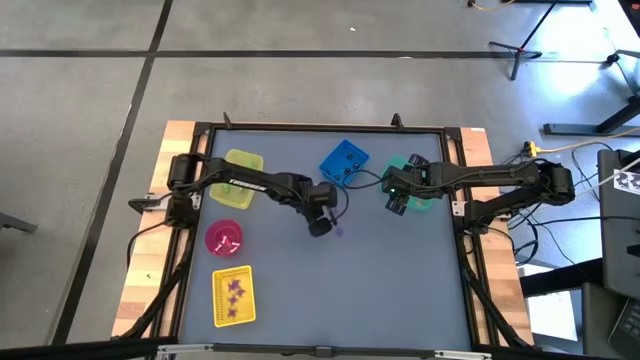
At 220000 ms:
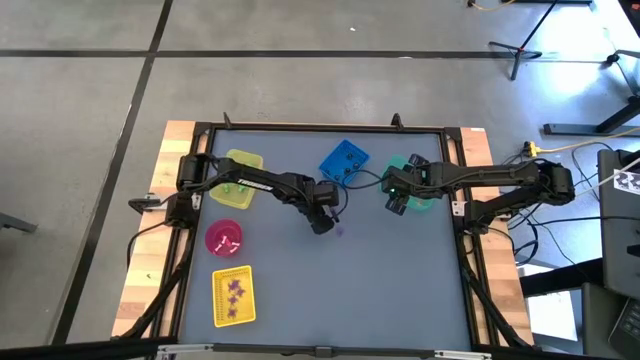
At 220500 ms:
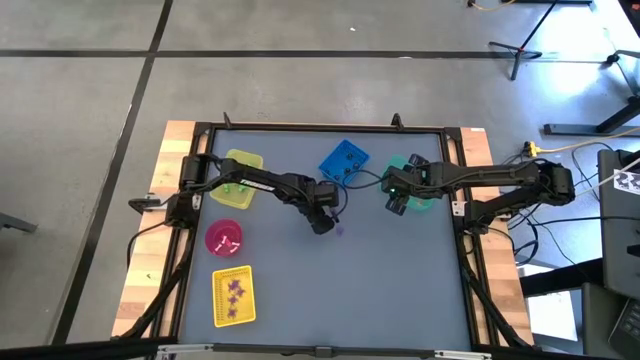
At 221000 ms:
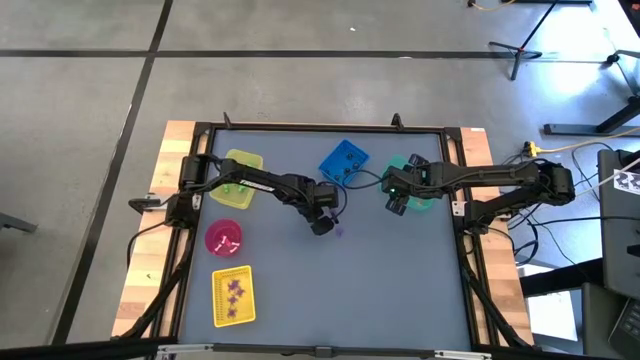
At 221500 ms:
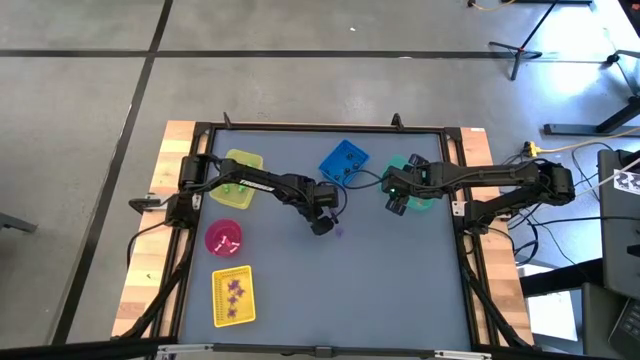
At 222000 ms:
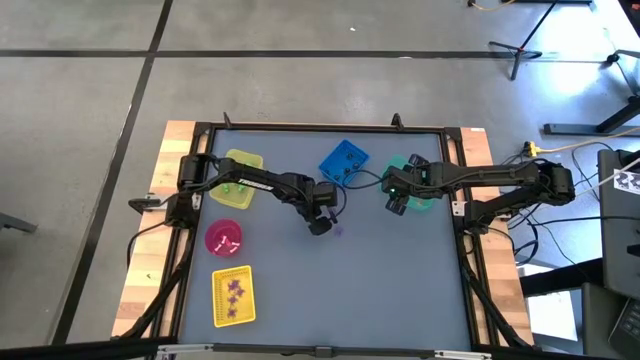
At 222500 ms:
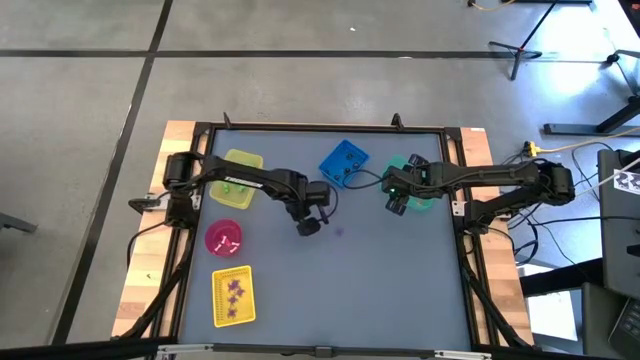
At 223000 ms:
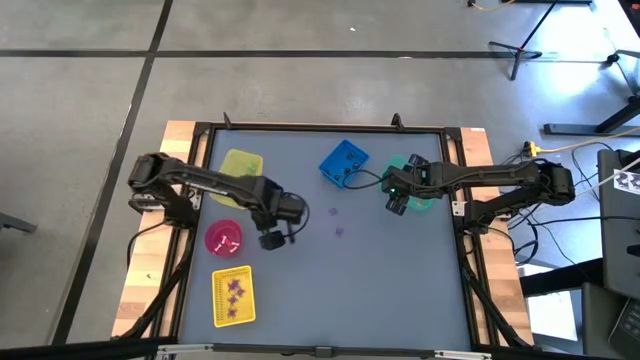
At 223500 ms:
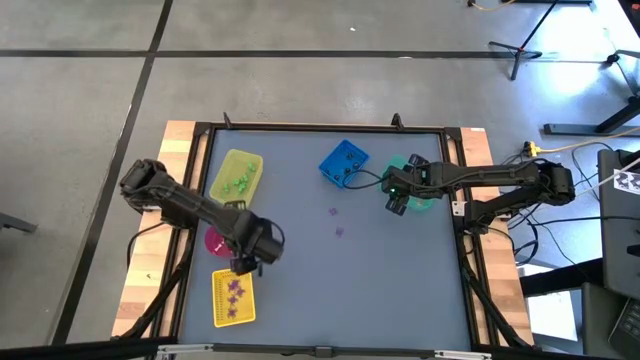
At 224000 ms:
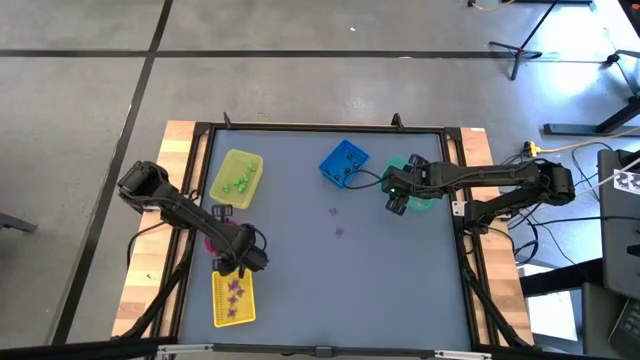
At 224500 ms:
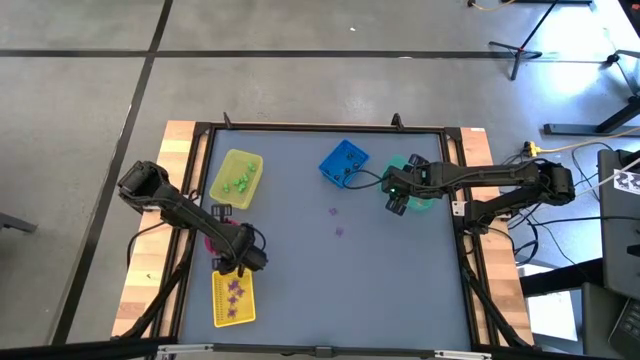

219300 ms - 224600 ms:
Task: Sort Halloween decoration
Put the white bone toy into the red bowl

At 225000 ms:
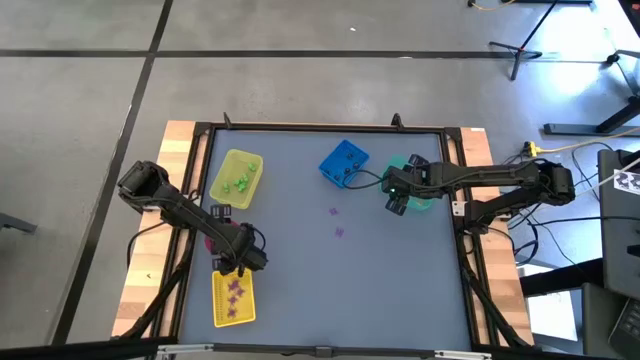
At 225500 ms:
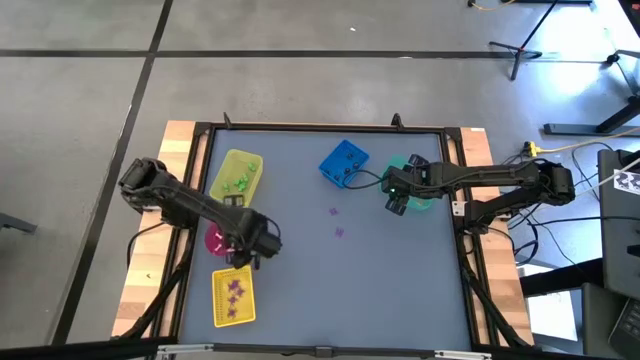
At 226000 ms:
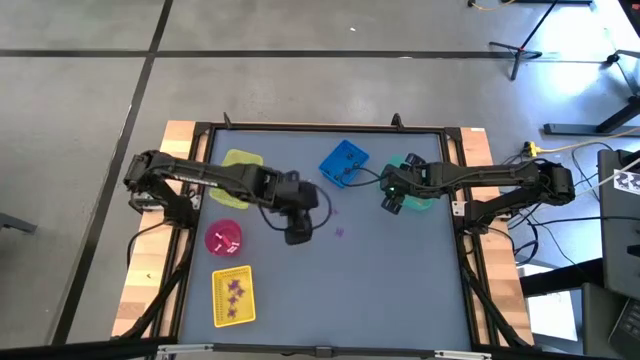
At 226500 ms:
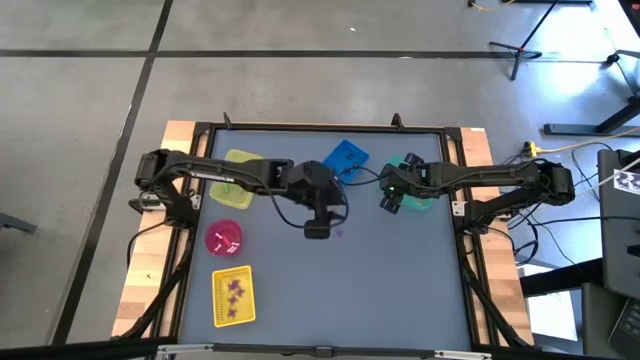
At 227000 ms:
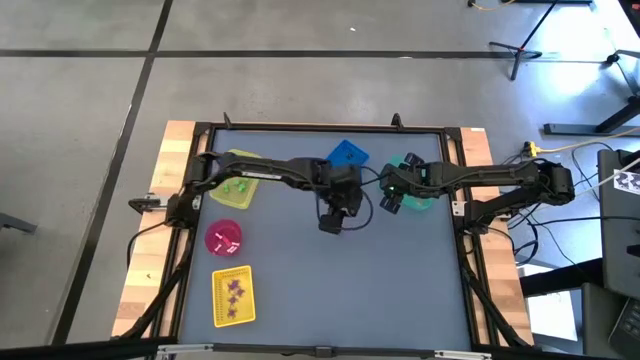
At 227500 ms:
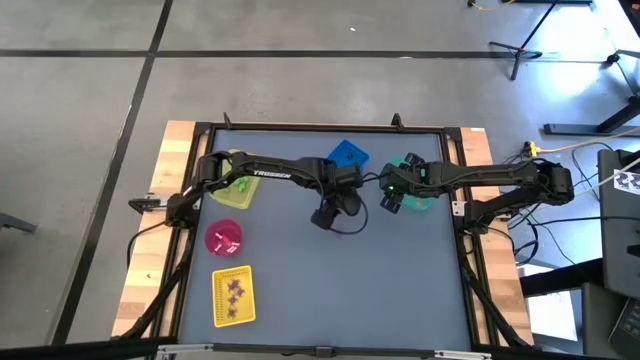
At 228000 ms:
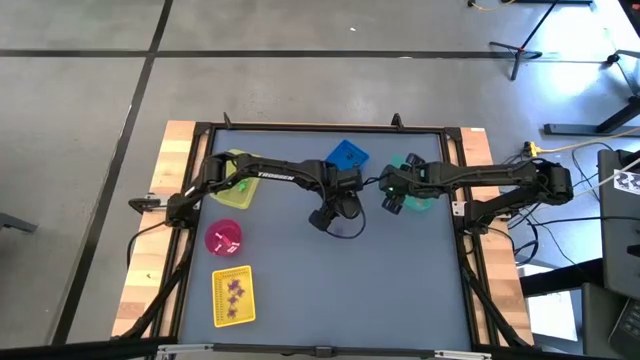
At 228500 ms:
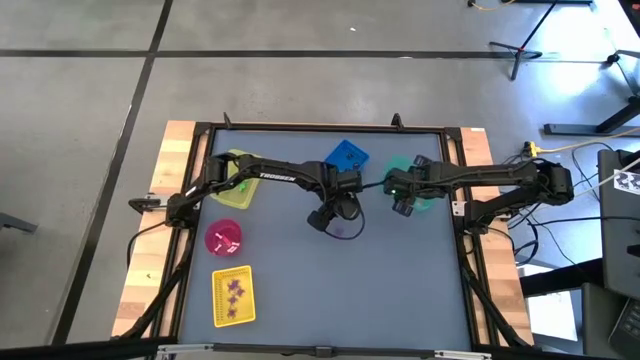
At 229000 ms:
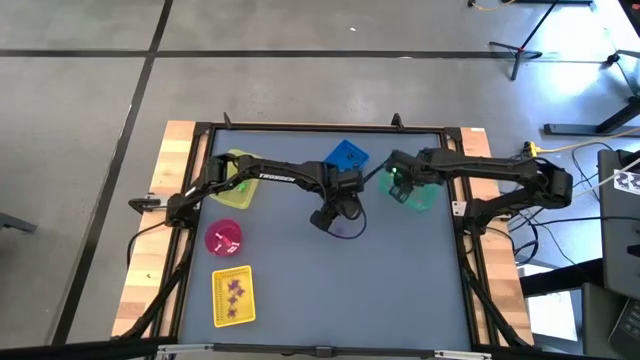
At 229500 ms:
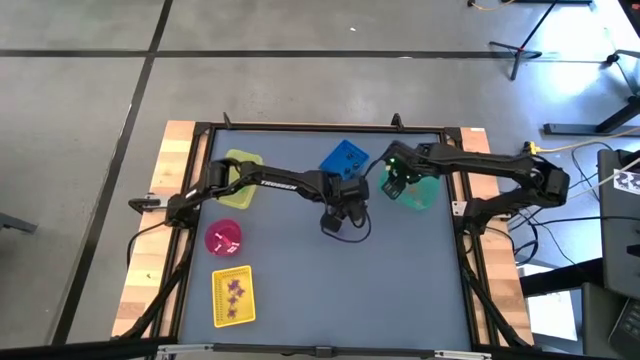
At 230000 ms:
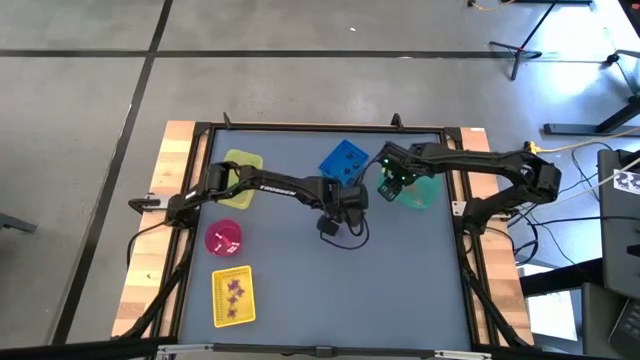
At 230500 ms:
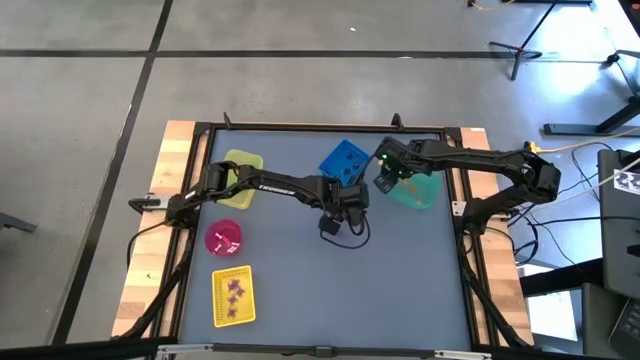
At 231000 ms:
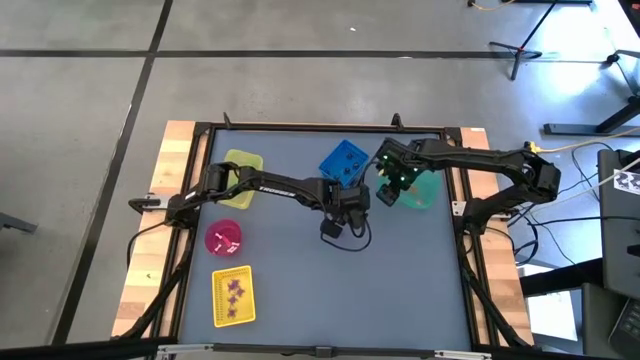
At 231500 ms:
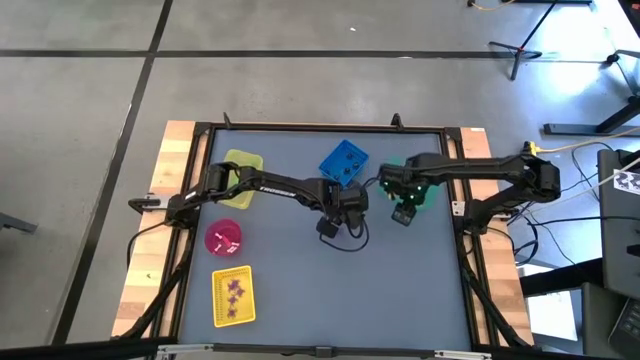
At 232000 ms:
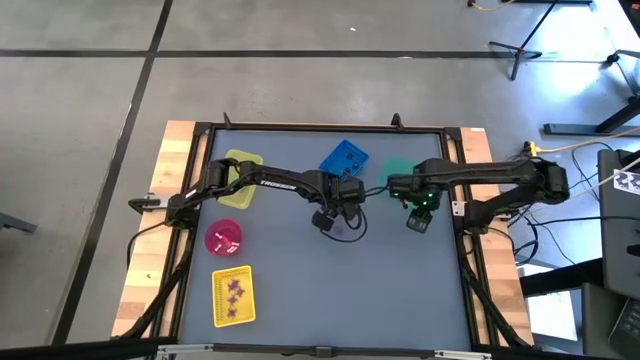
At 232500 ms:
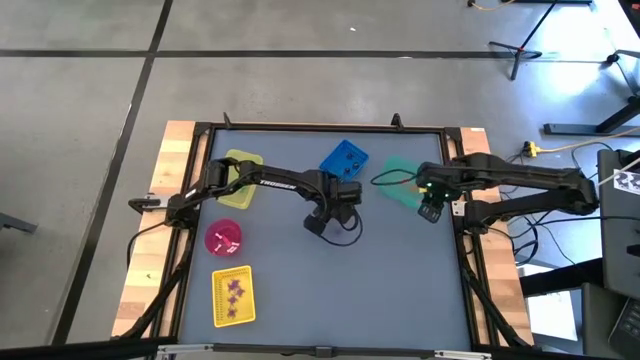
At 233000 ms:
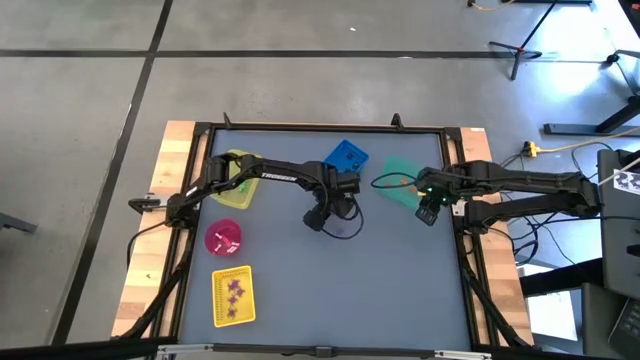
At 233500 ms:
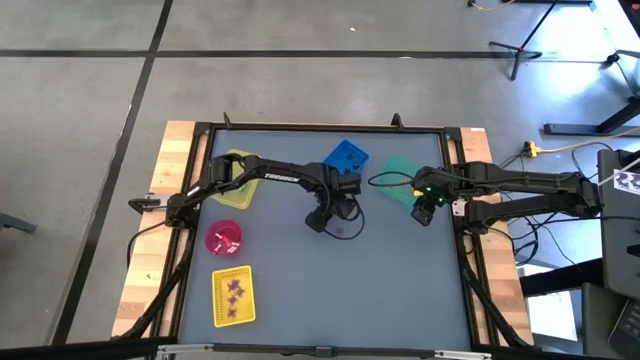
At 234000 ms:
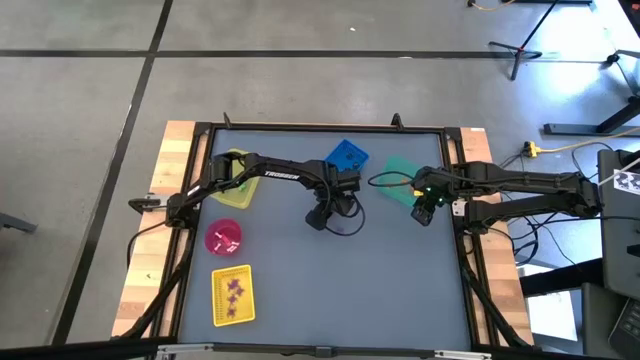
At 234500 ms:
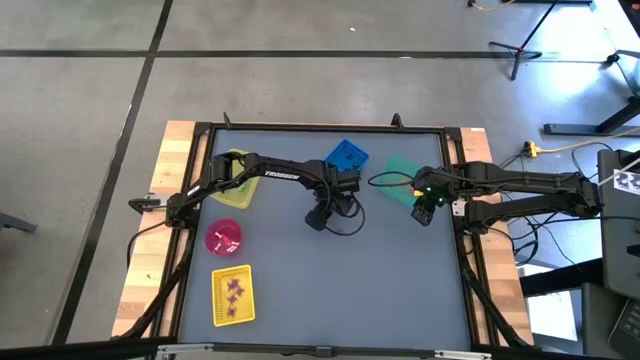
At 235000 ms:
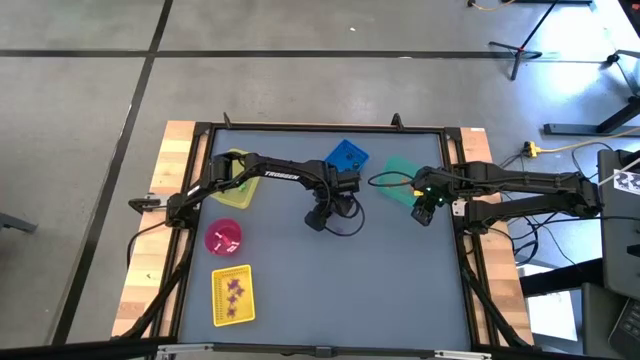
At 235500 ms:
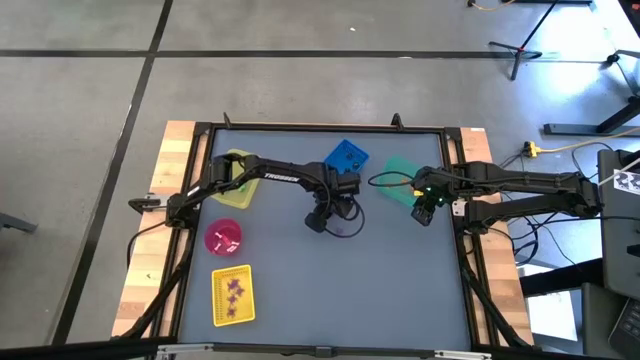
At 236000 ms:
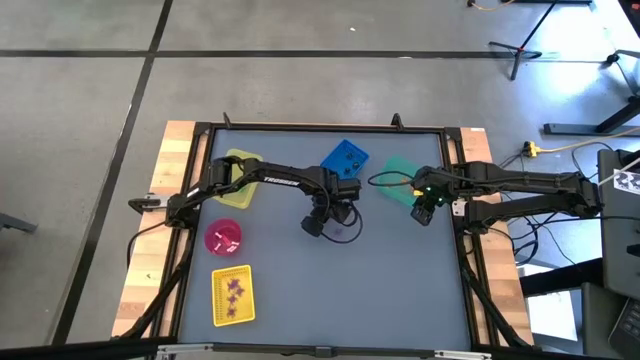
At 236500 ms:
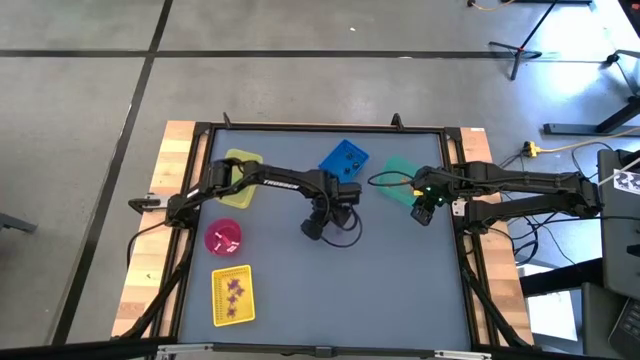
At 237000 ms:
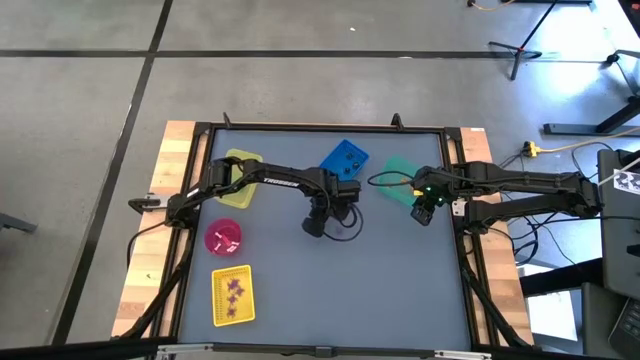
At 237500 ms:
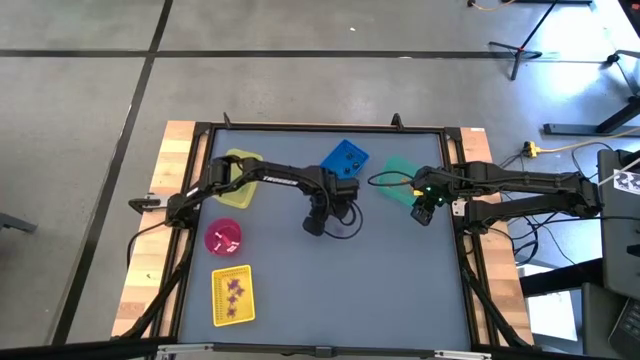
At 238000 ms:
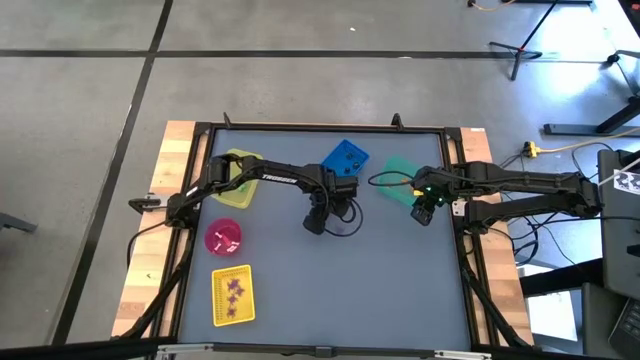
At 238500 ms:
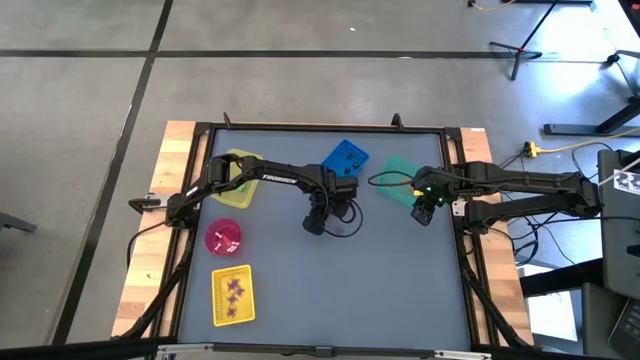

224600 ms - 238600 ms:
Put the purple spider toy into the yellow basket

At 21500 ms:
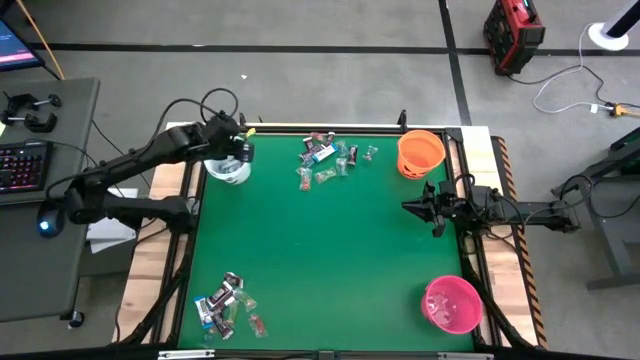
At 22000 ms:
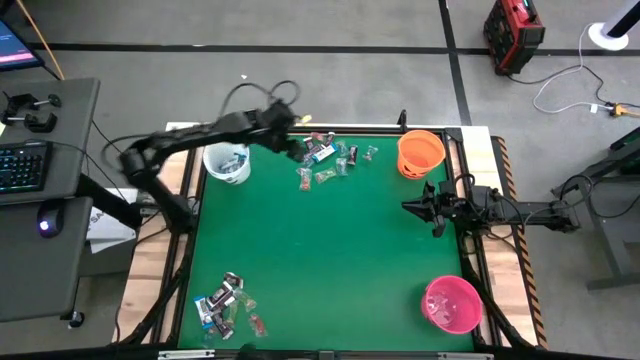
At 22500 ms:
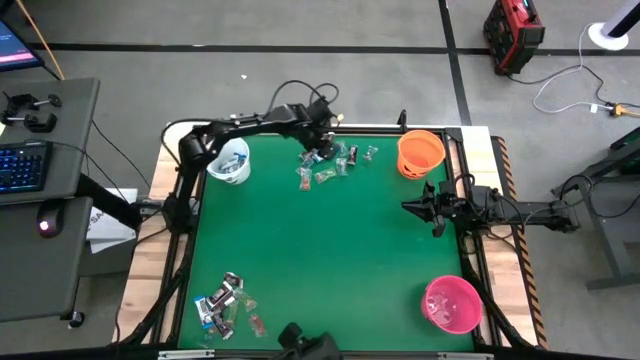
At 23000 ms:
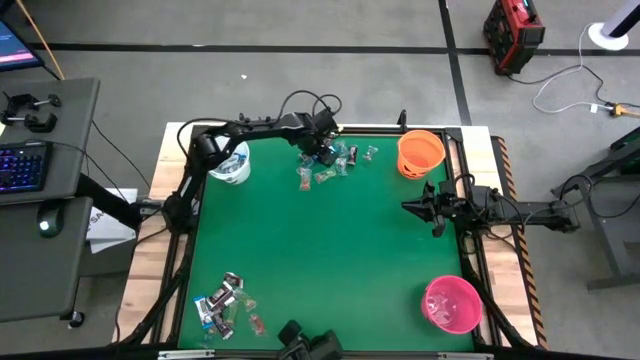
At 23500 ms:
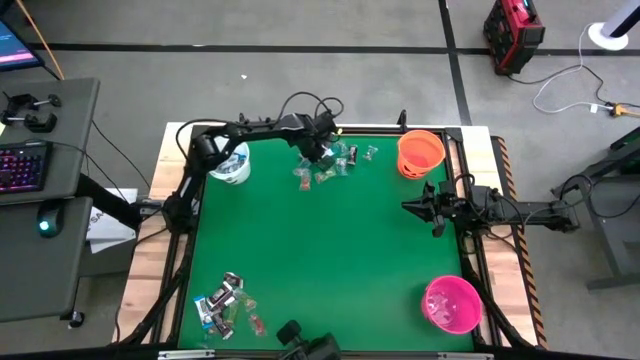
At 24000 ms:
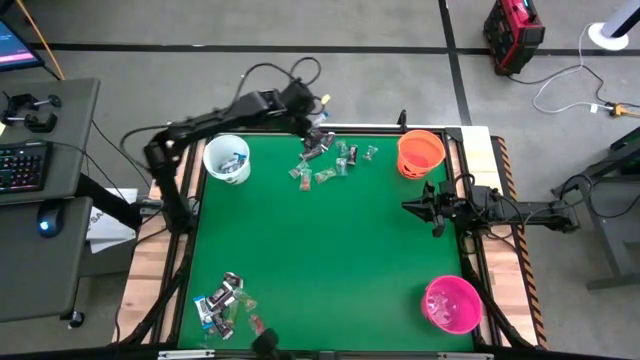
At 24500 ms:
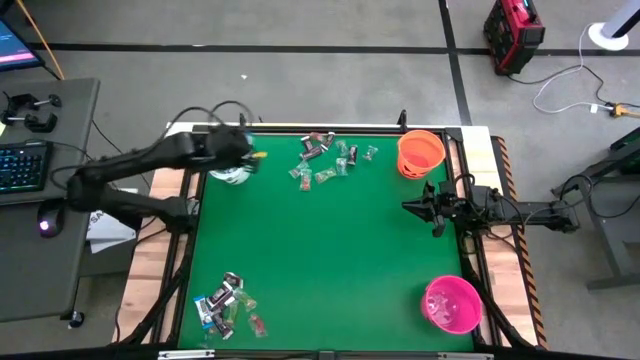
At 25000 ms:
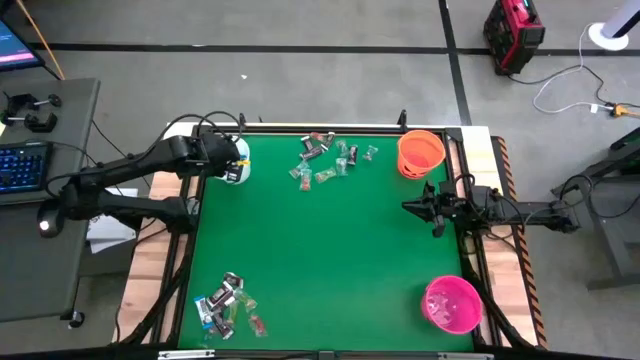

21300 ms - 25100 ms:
Task: Sort candy by brand, put in halloween buckets
Put the white chocolate bar into the white bucket
